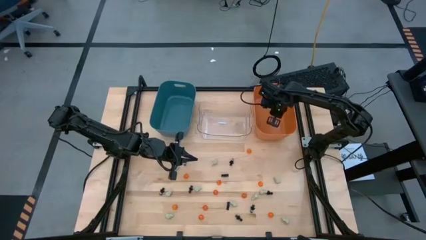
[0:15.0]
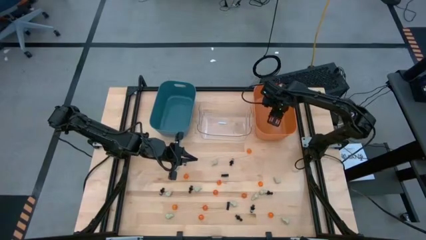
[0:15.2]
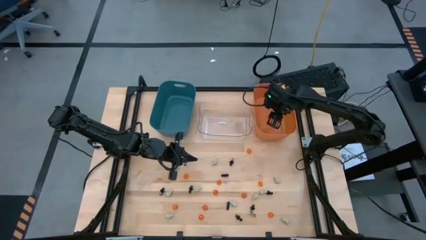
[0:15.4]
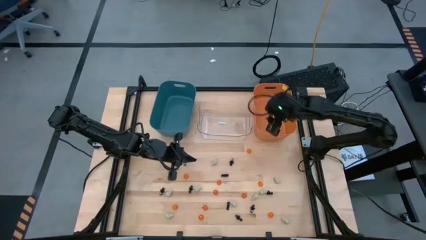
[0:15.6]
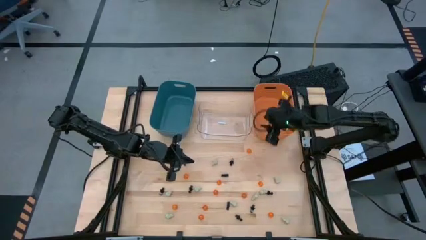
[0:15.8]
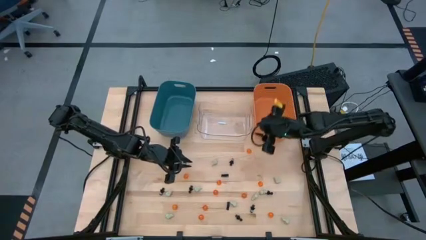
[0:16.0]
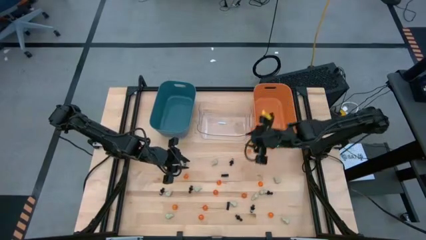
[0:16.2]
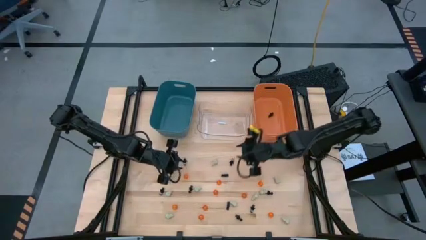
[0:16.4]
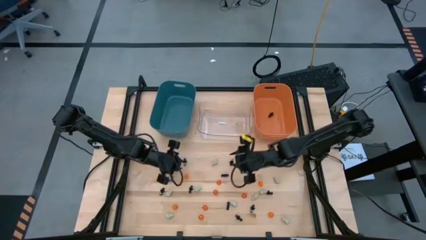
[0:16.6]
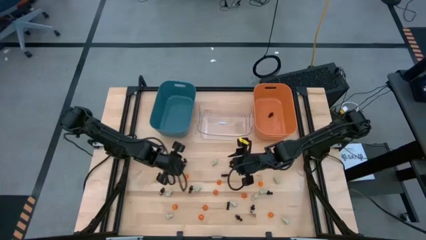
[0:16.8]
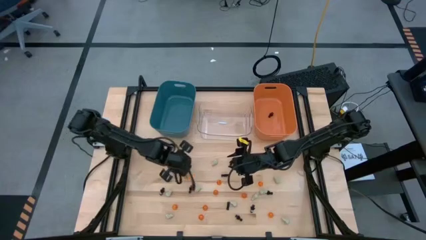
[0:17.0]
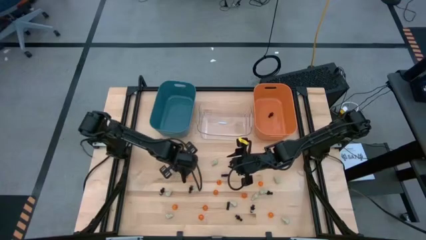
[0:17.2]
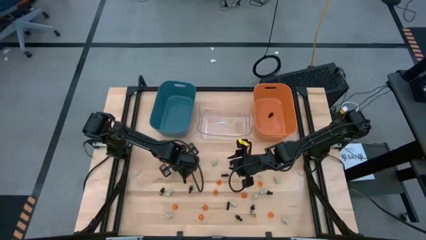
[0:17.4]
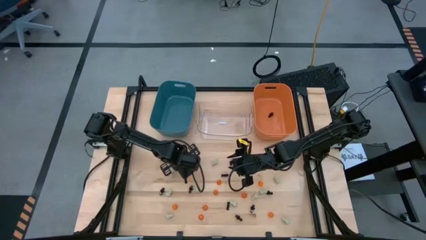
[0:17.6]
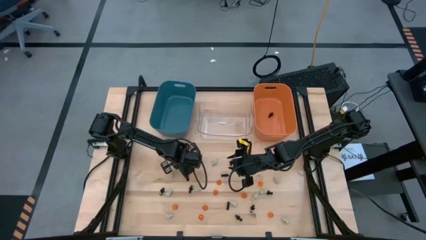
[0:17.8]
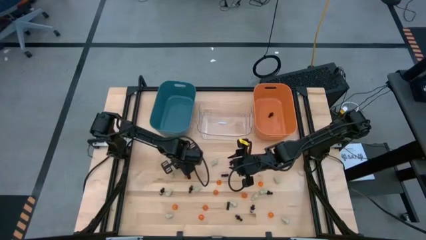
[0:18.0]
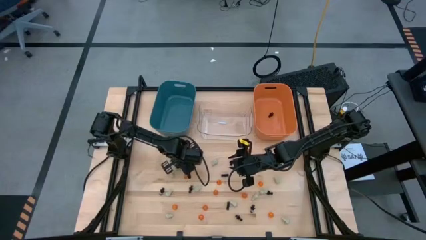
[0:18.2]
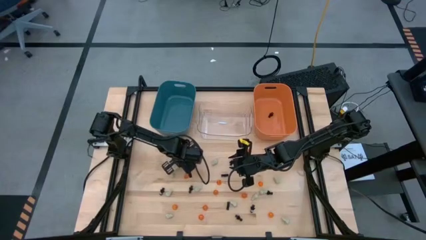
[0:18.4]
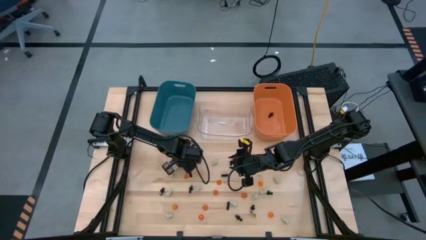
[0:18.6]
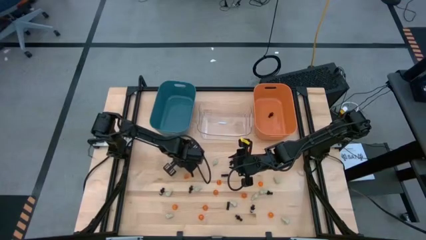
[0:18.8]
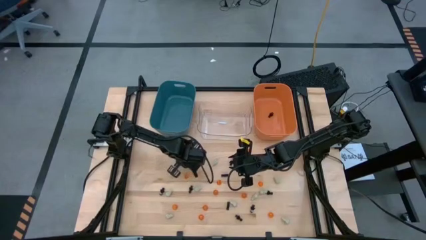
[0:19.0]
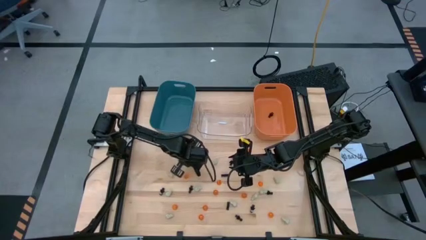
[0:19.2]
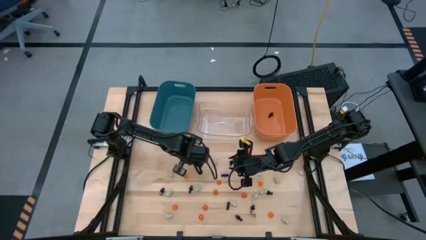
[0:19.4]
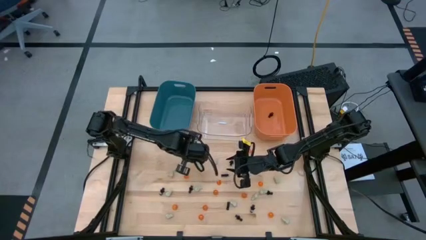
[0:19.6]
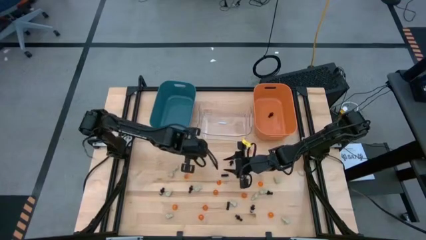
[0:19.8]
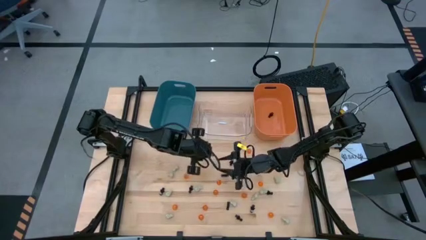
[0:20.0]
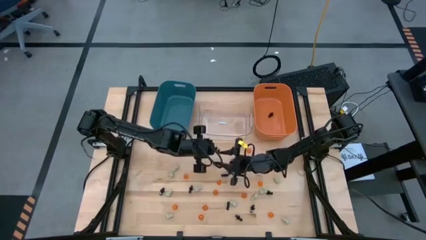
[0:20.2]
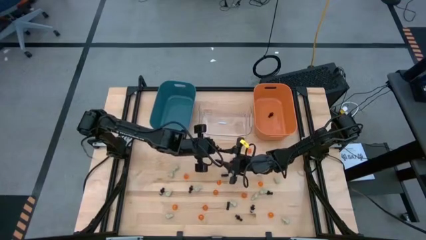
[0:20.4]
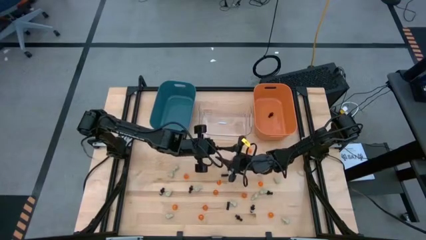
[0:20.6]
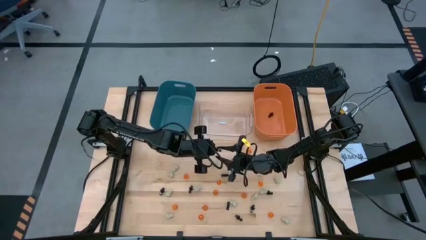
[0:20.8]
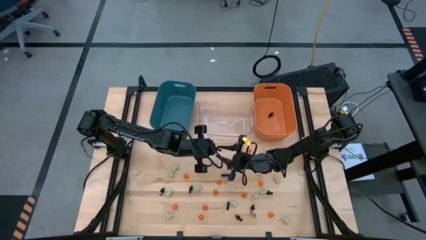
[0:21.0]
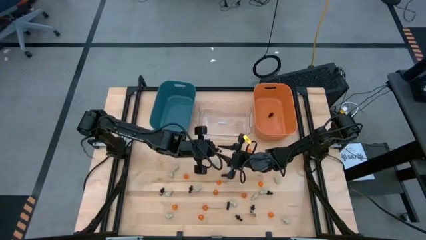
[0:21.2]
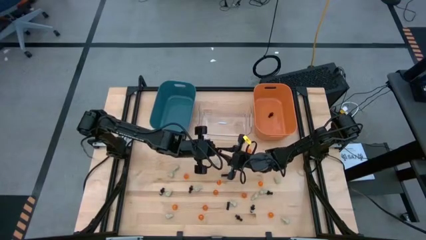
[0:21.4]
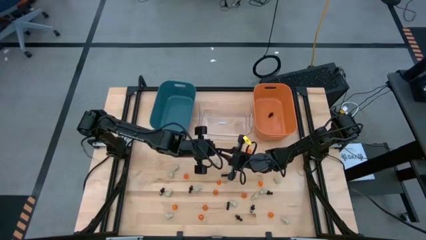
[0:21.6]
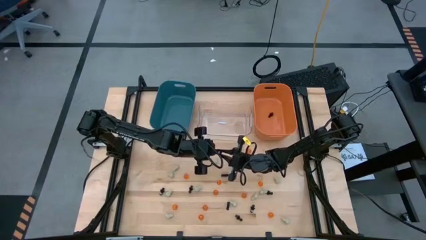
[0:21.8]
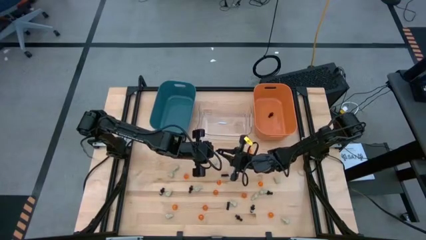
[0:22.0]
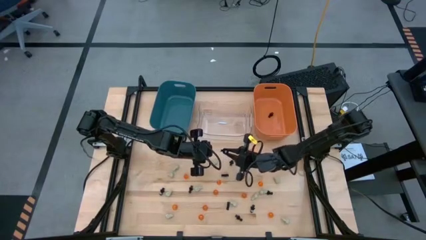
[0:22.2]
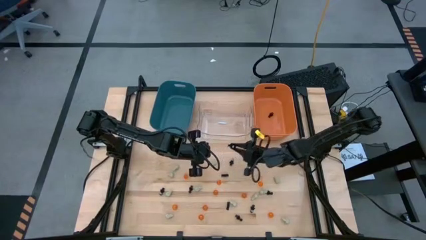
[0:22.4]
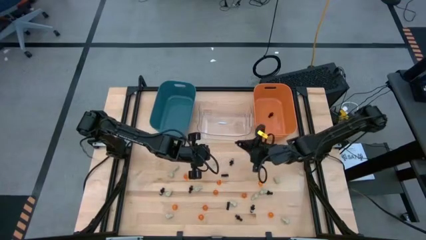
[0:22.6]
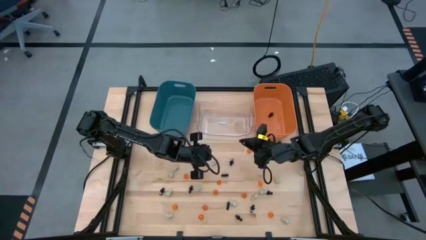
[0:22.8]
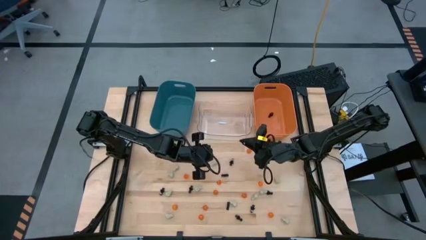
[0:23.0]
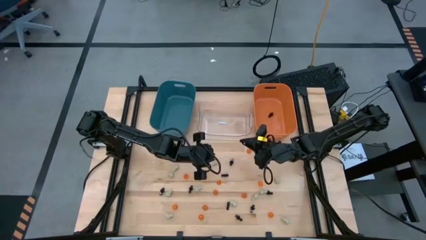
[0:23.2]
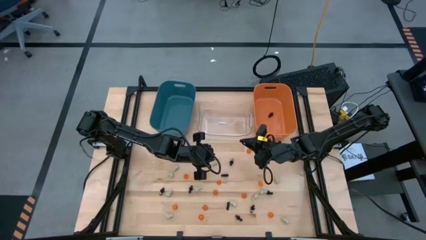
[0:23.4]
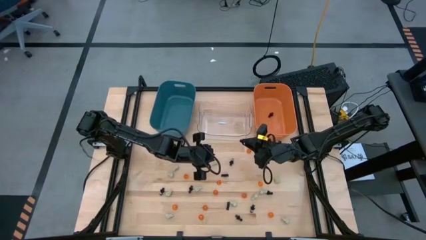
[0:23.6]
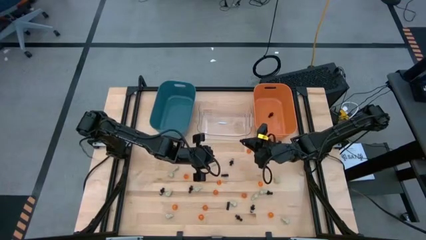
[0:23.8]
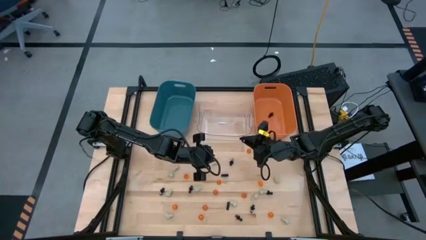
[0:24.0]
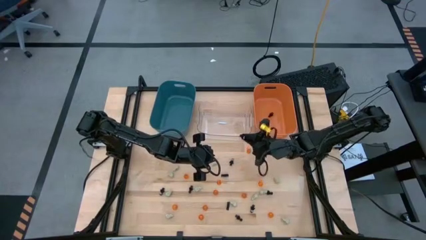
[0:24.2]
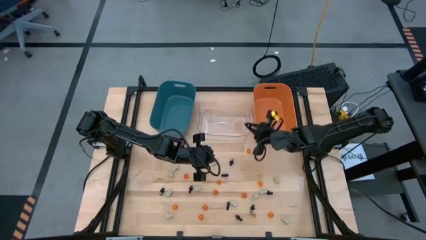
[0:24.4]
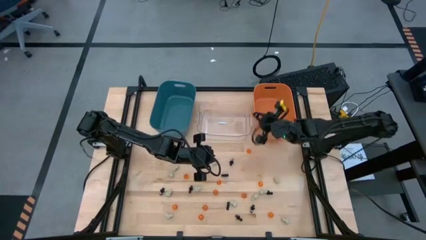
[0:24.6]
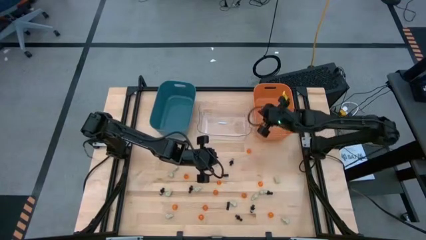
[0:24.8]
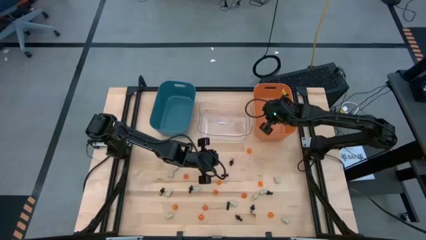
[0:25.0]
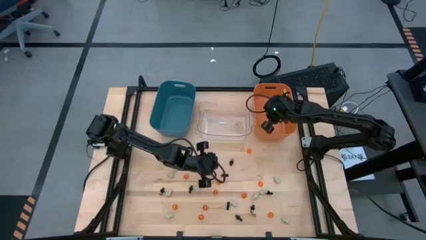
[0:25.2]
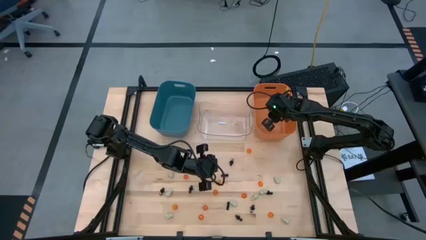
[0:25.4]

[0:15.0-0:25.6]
Task: Sort Halloween decoration
Put the black skeleton toy into the orange bin

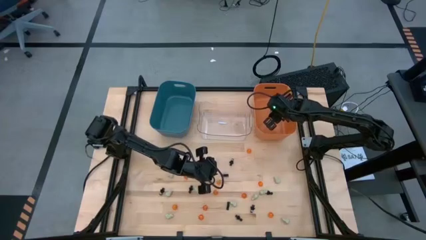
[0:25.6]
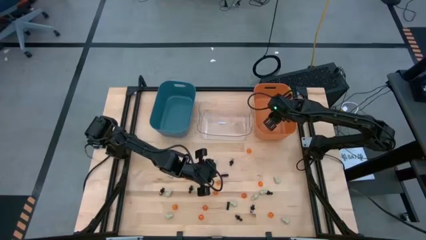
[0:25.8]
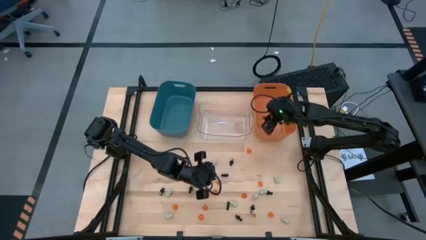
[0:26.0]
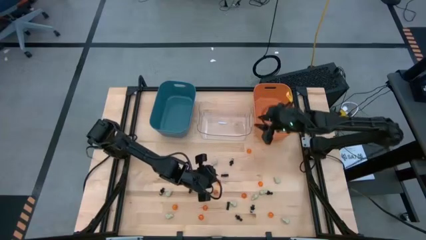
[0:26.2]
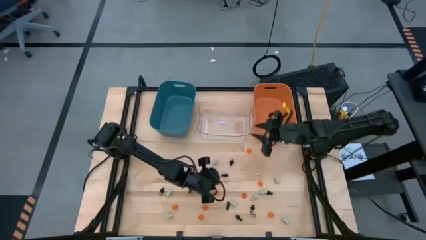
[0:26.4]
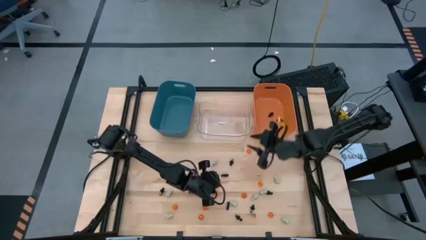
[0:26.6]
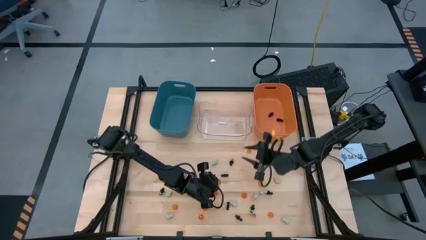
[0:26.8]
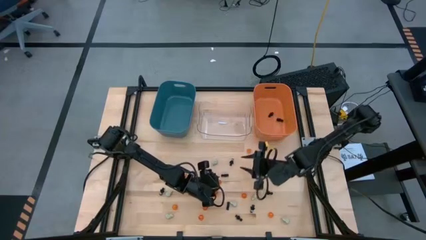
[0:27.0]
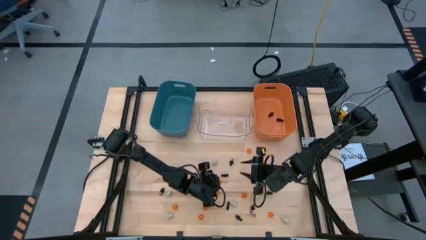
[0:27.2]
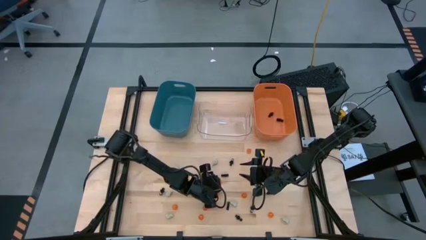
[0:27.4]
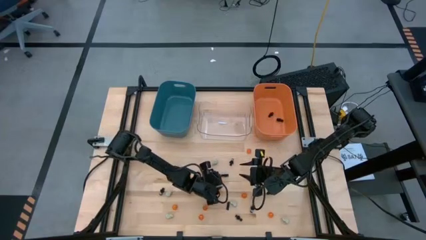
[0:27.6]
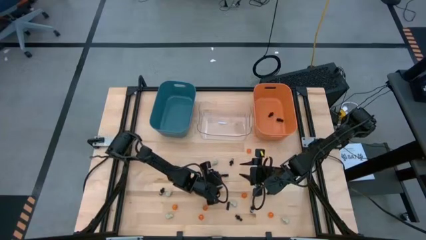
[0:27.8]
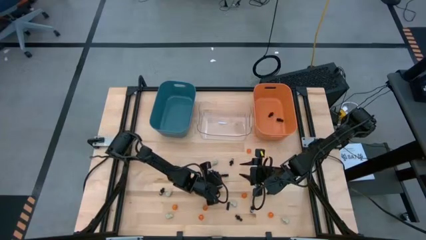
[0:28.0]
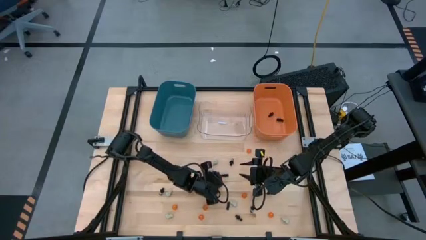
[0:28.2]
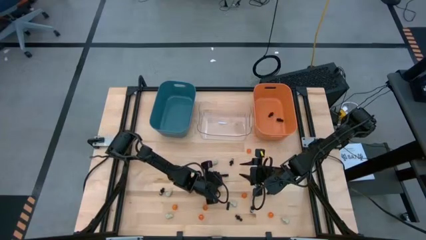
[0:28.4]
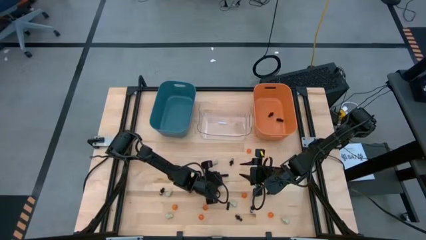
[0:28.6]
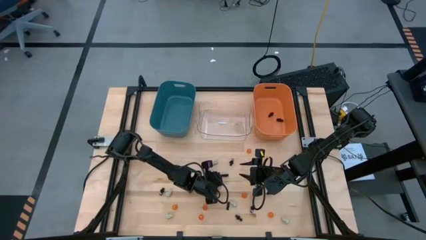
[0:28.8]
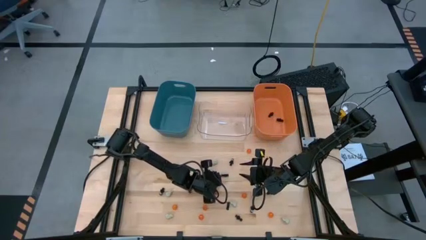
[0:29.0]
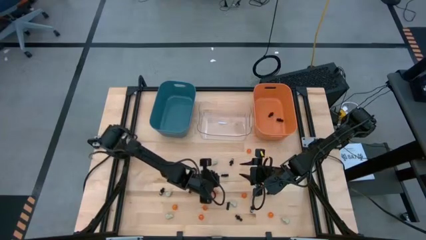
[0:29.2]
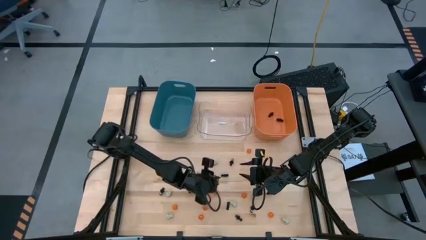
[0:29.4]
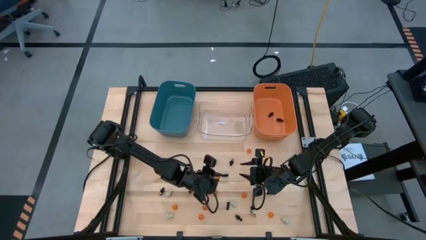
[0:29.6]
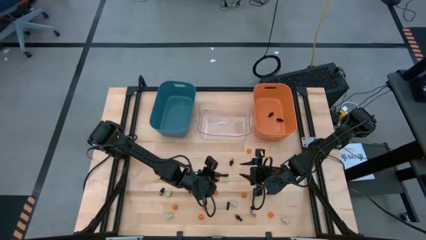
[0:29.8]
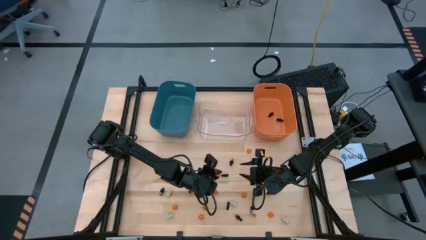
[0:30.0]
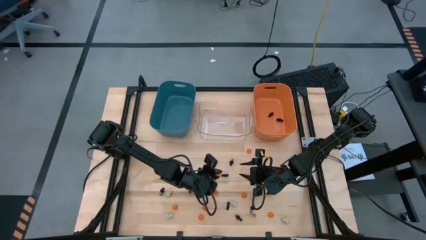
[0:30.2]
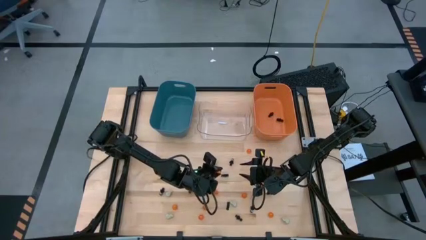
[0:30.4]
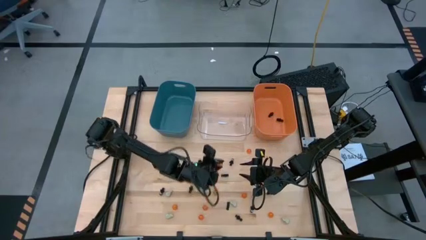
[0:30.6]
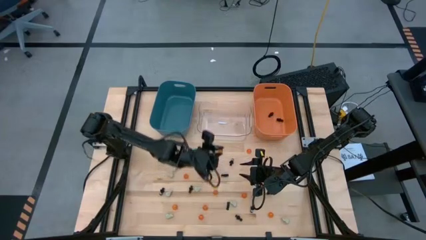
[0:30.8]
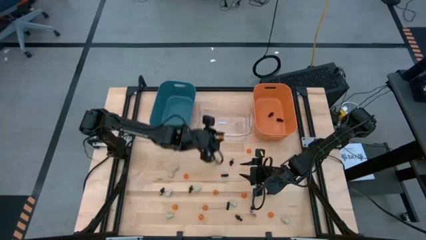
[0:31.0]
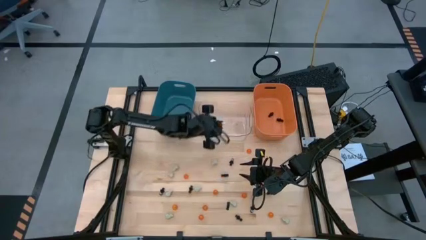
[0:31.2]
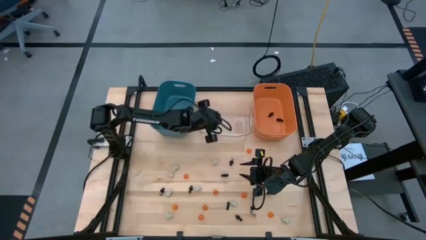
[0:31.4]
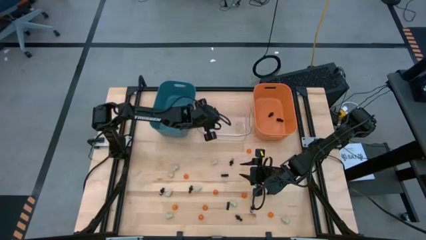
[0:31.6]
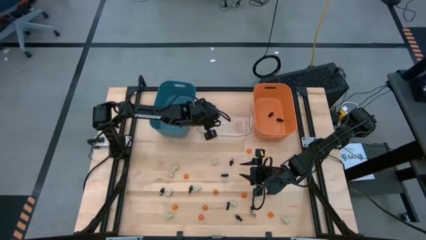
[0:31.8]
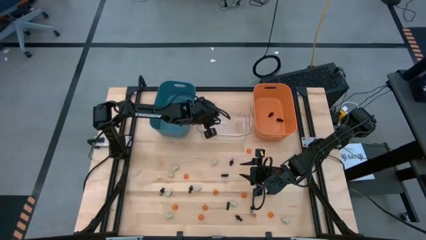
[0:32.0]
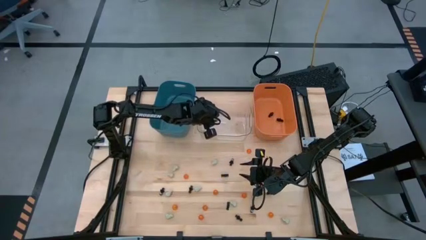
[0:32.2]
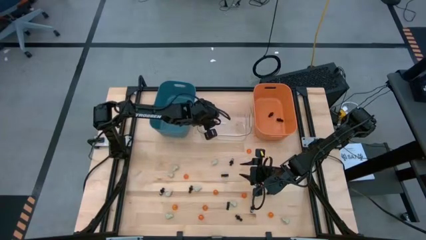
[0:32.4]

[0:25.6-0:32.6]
Put the orange pumpkin toy into the transparent bin
